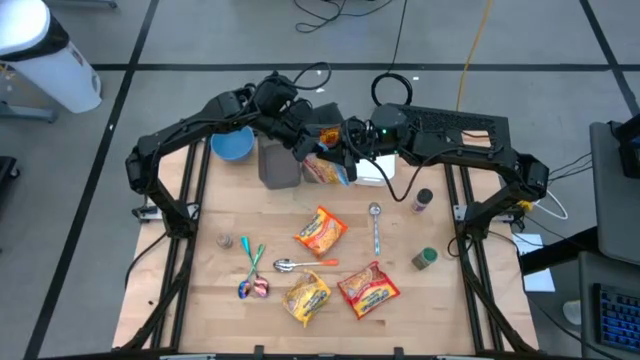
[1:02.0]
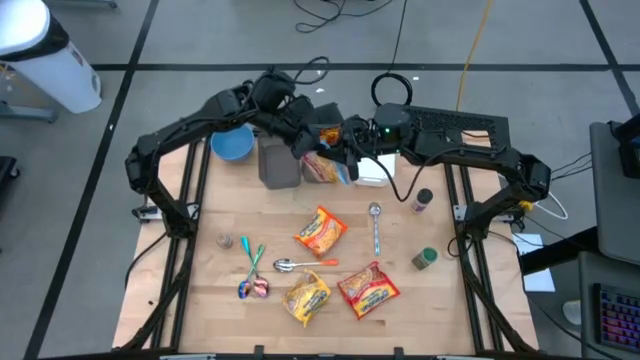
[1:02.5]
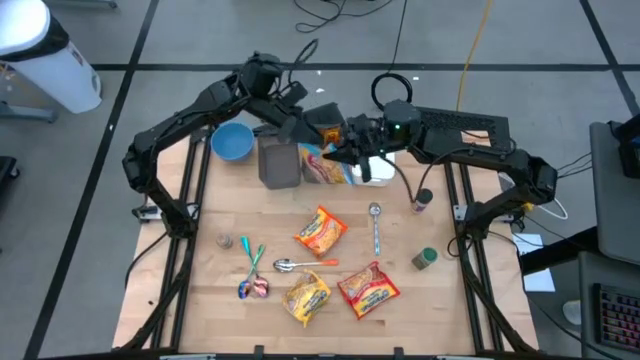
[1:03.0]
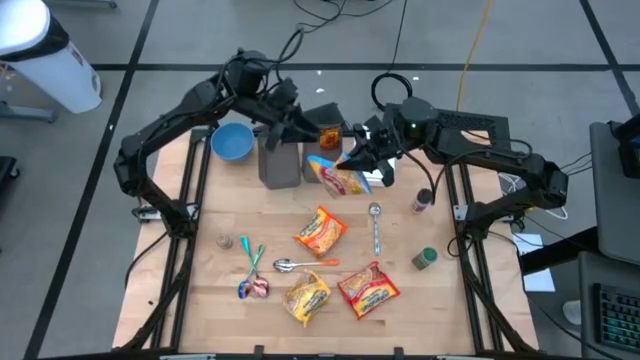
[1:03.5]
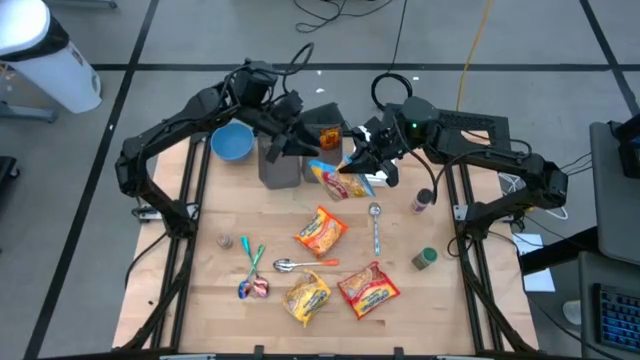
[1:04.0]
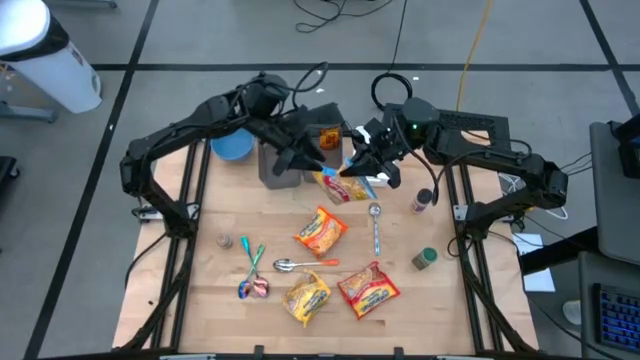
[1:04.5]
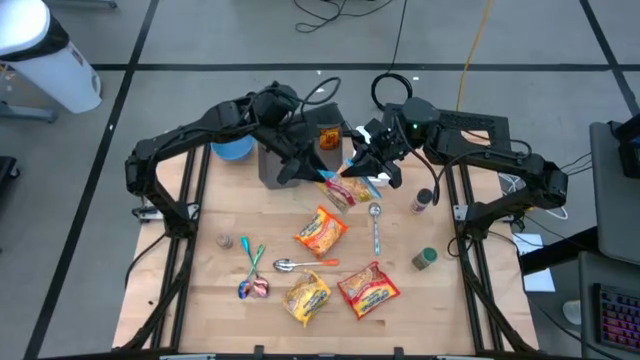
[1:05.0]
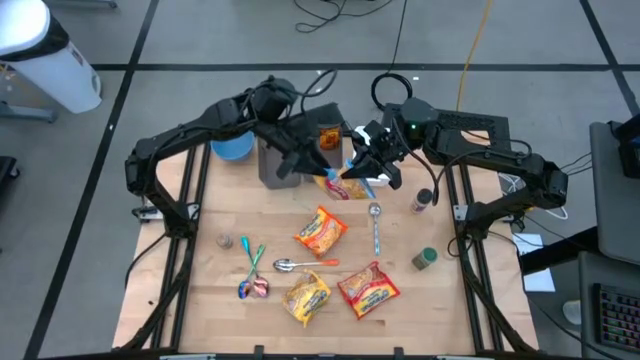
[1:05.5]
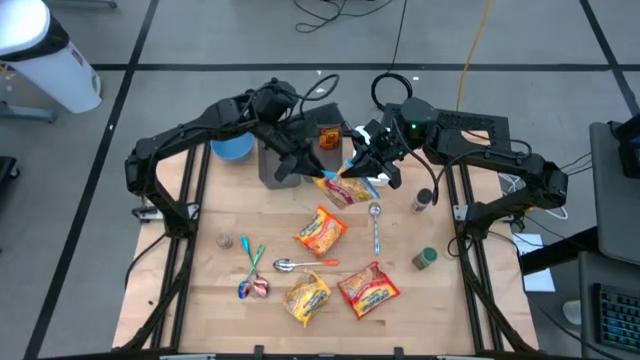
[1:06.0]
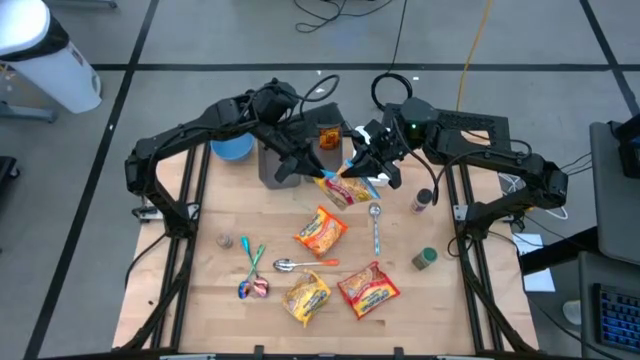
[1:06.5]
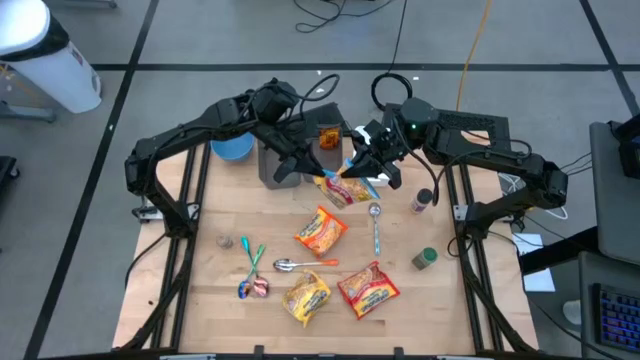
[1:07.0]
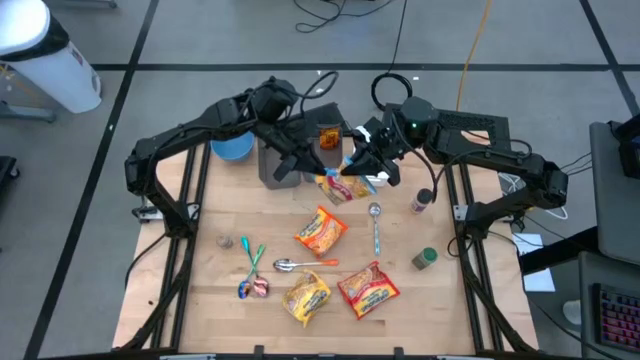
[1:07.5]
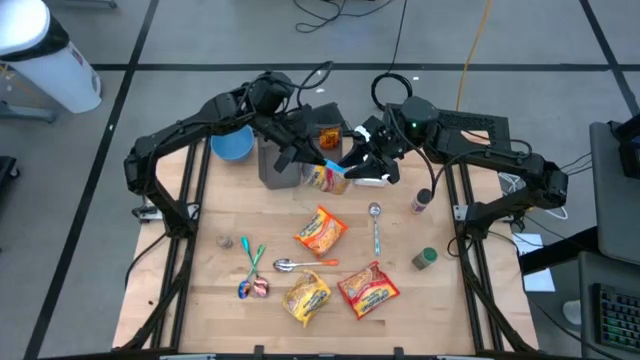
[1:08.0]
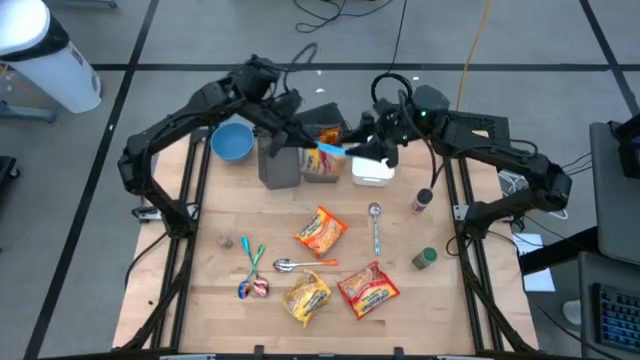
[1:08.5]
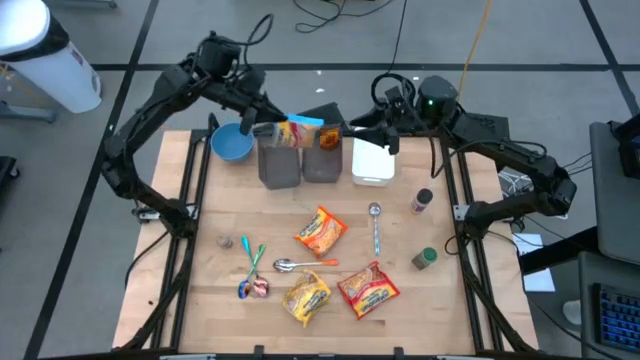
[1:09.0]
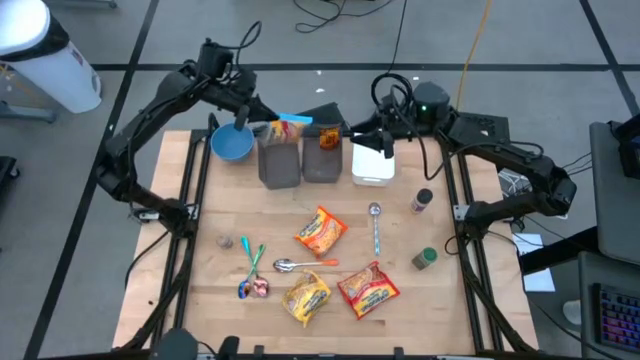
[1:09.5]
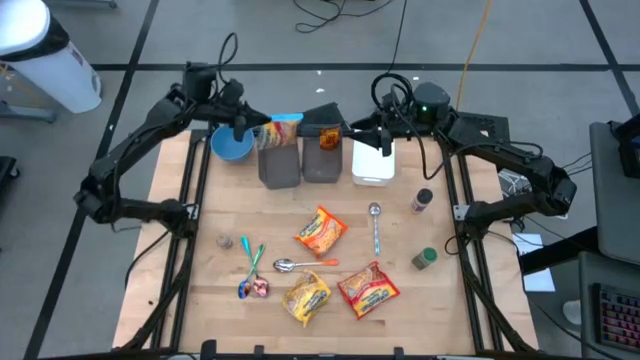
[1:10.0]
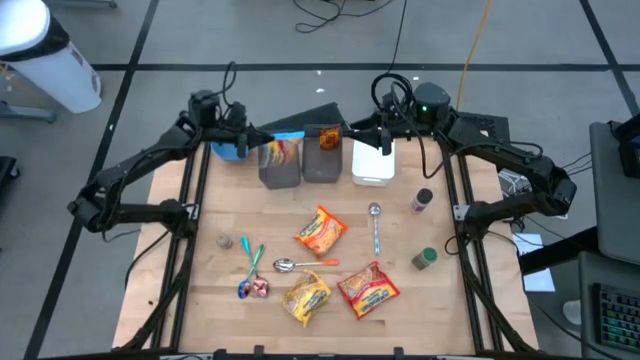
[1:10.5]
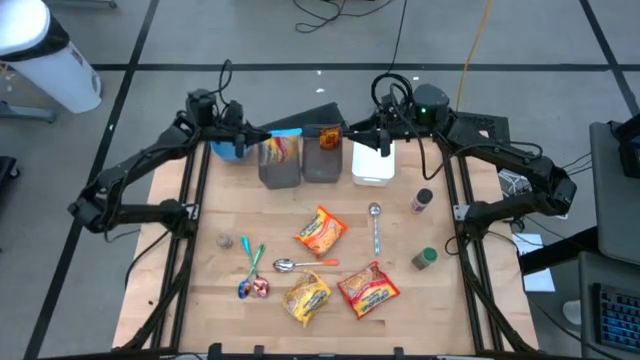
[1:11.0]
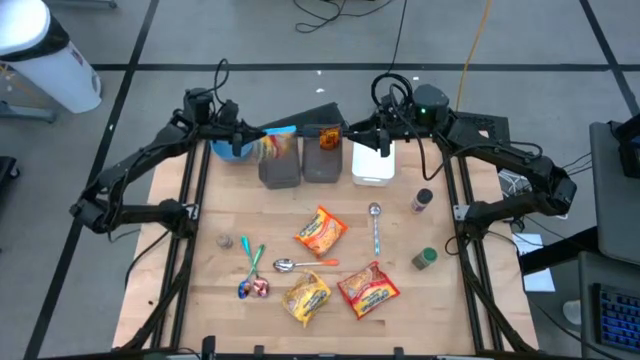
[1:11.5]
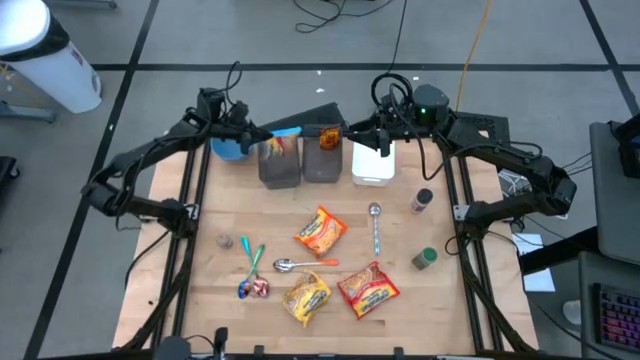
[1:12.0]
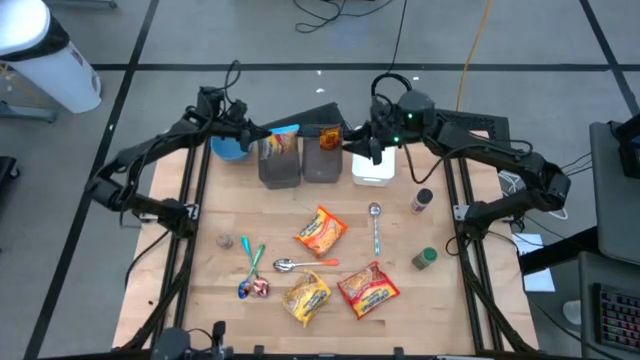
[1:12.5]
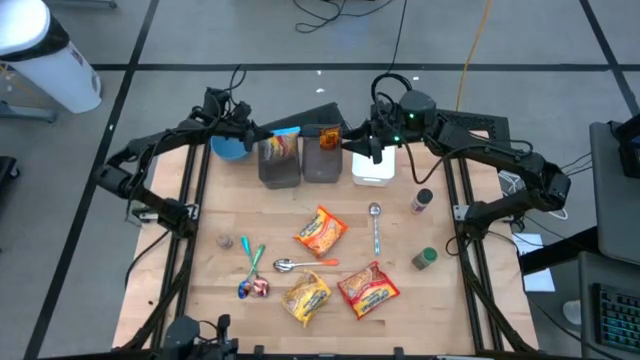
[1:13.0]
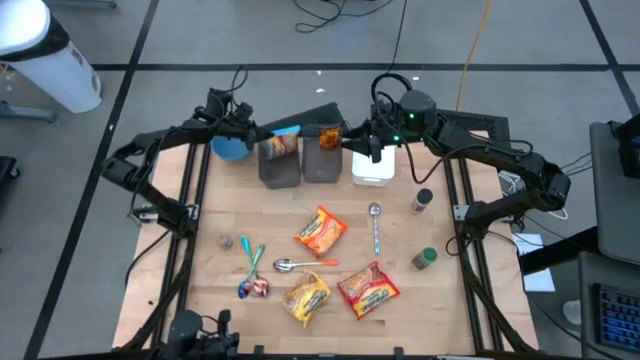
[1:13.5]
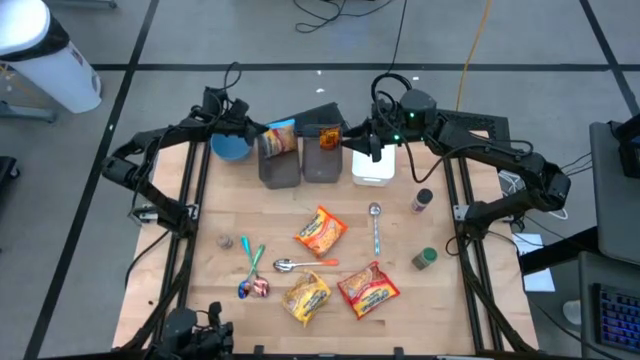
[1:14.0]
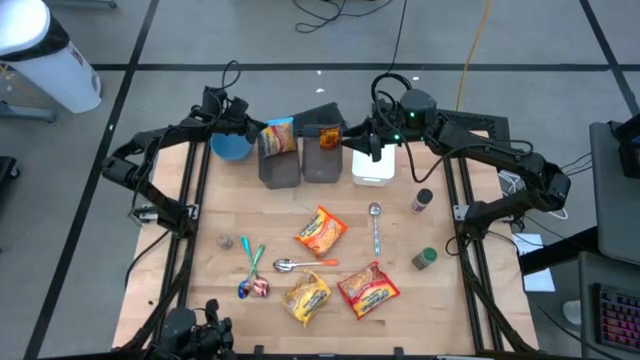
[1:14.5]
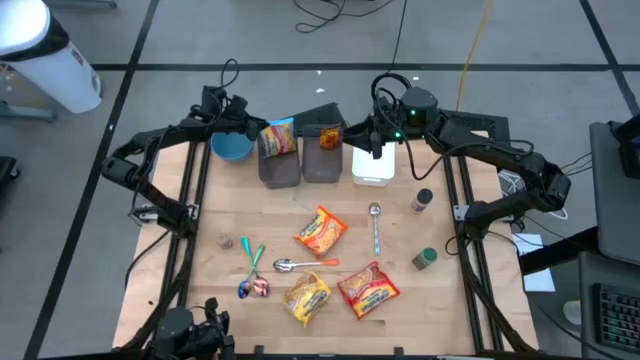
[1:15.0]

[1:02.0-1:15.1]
Task: Pick & Place Food Item
Put the blue noodle pack into the left black bin

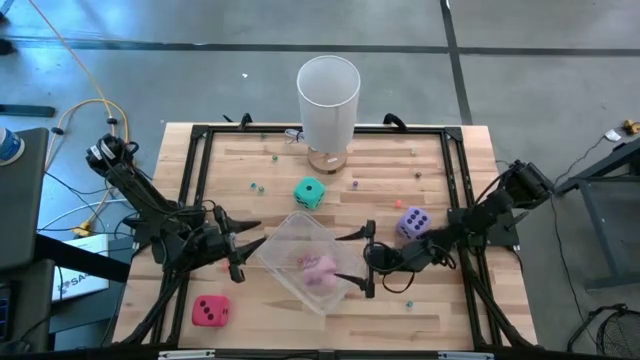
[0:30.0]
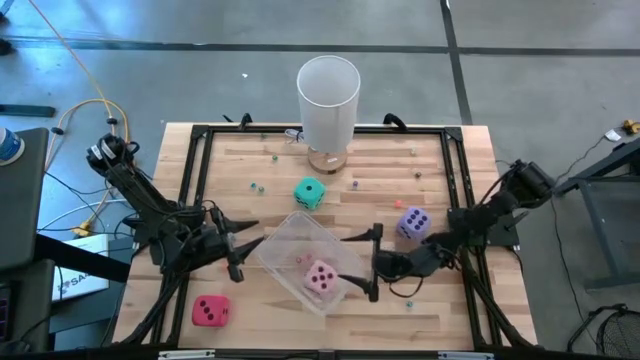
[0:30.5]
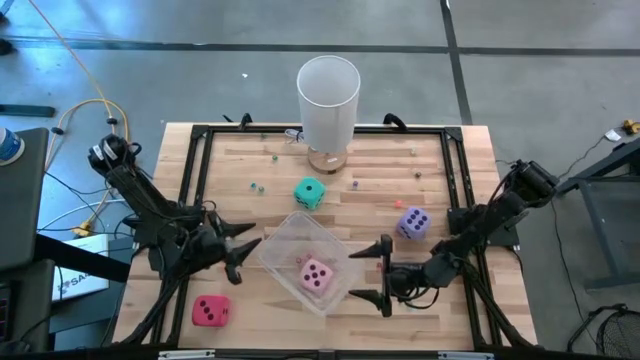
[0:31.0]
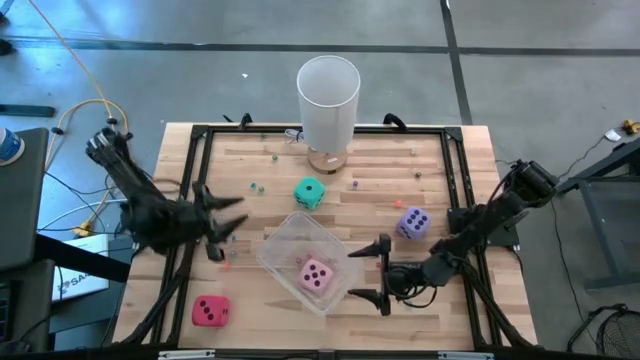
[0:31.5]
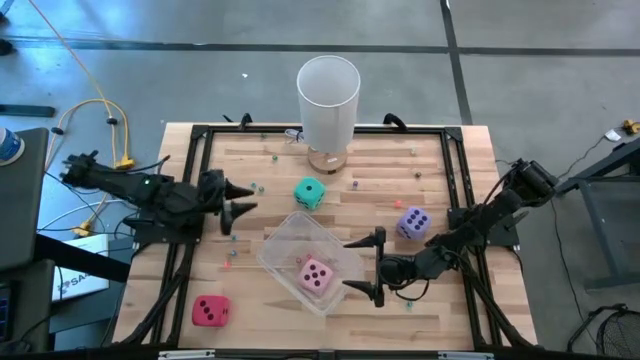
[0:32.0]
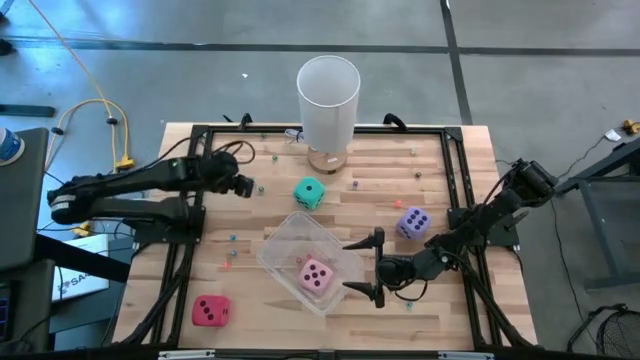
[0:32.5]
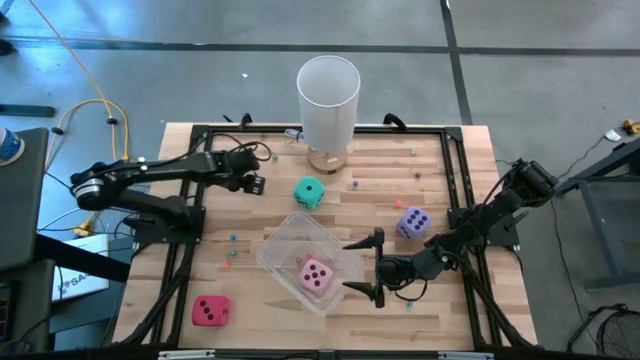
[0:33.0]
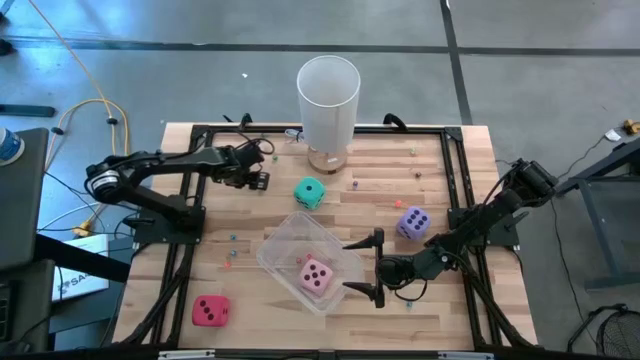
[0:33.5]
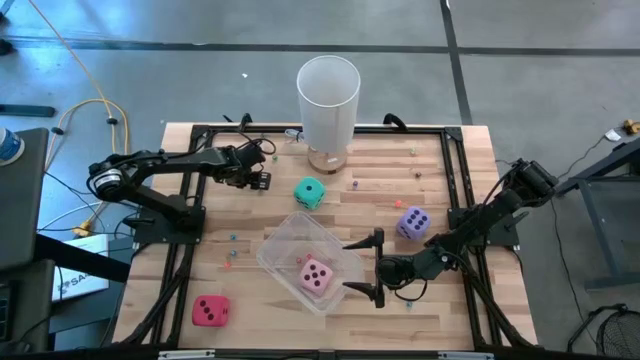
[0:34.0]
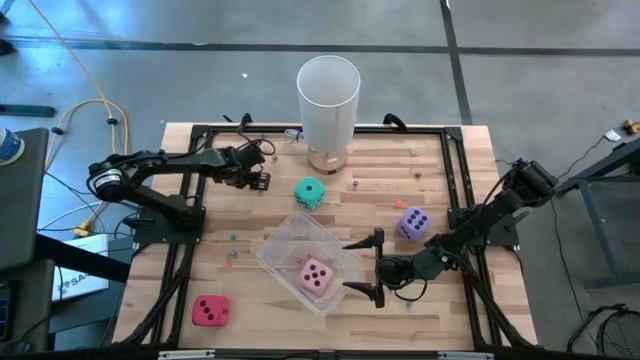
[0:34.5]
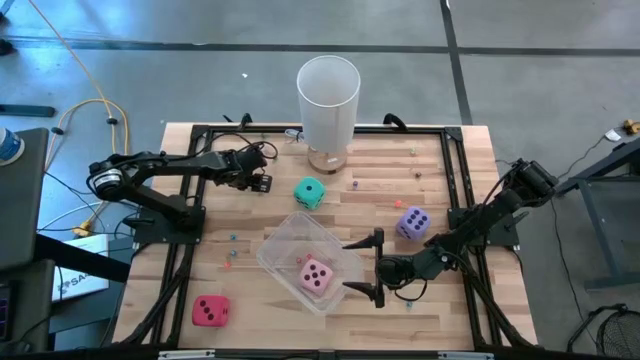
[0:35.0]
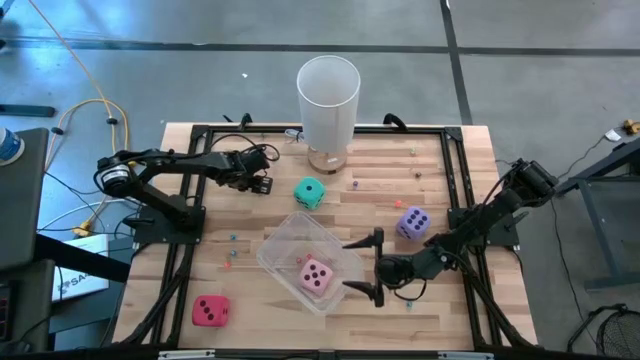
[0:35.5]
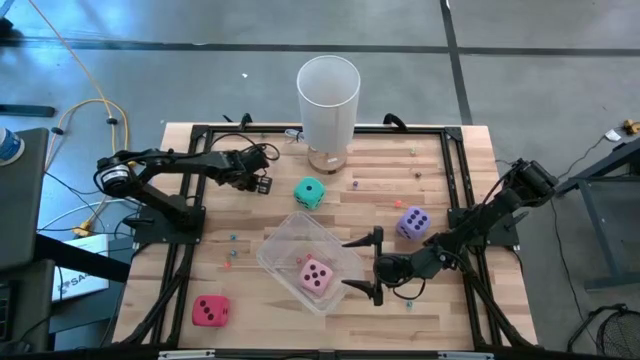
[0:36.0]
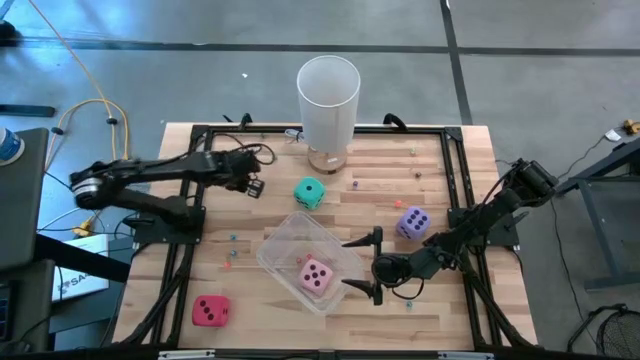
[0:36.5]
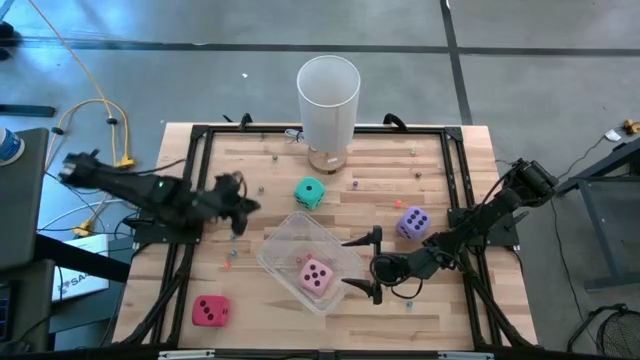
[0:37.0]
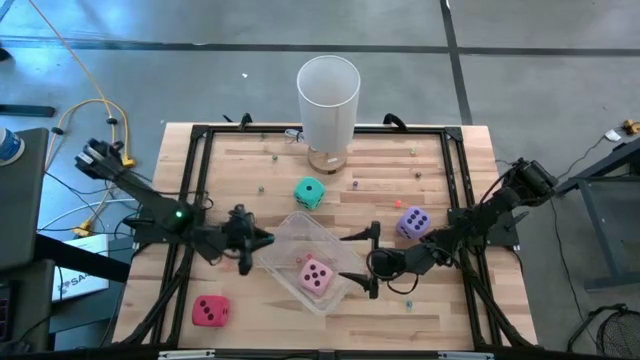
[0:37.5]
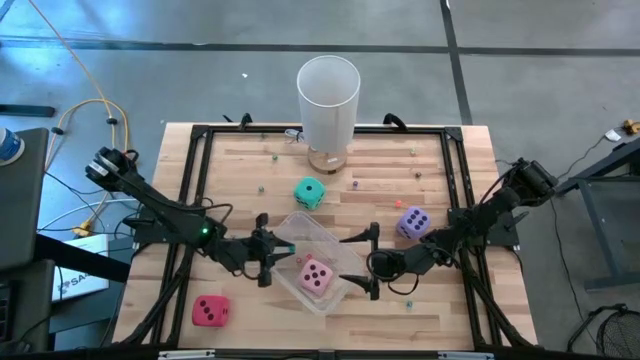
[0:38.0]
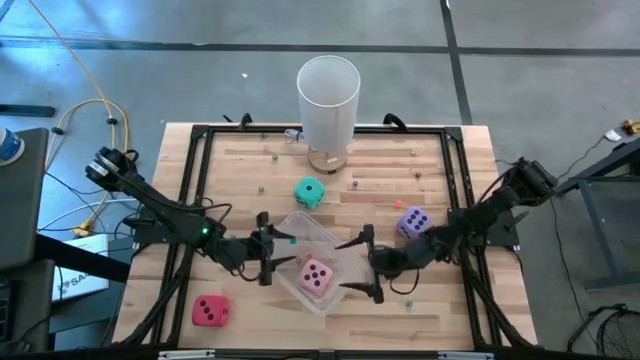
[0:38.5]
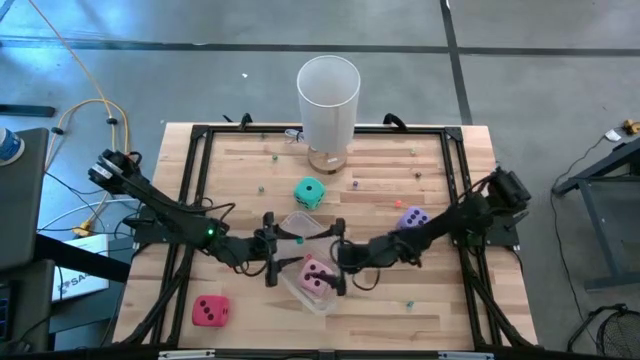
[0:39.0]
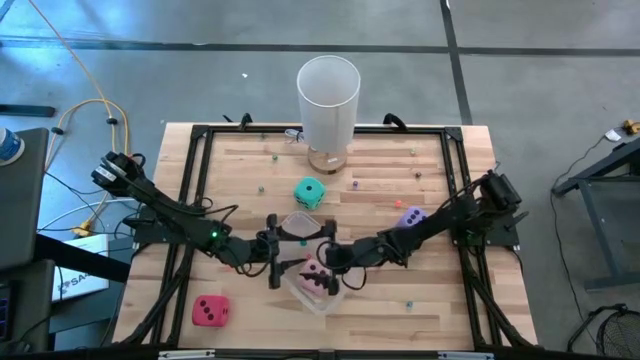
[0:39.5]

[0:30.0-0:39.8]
Task: Pick & Place Dice
Put the small blue dice into the transparent bin
